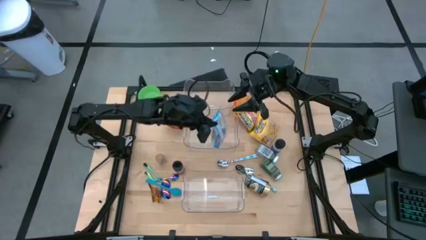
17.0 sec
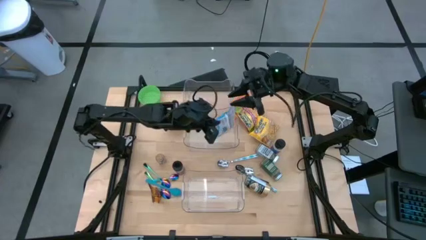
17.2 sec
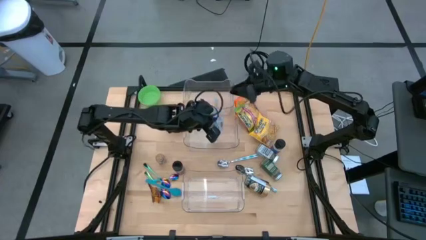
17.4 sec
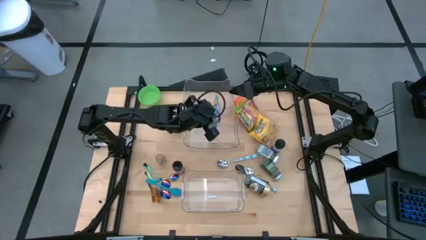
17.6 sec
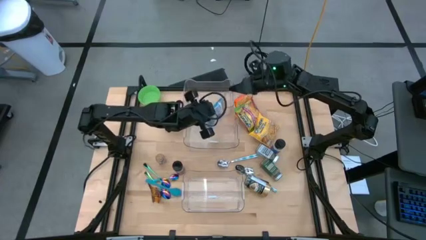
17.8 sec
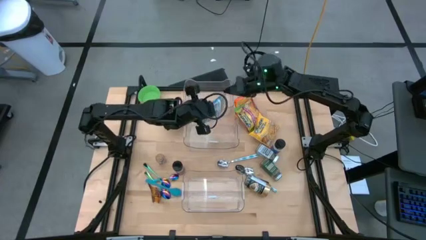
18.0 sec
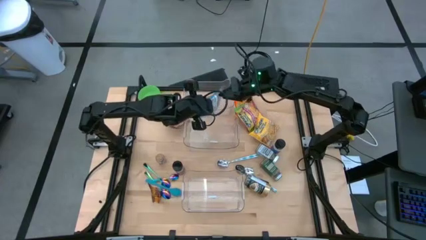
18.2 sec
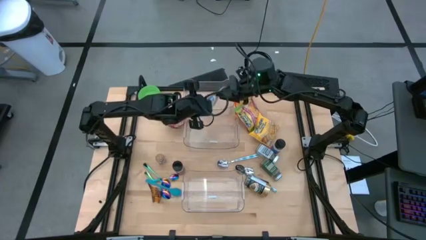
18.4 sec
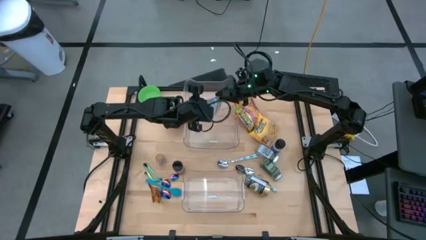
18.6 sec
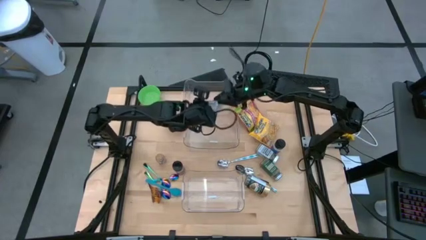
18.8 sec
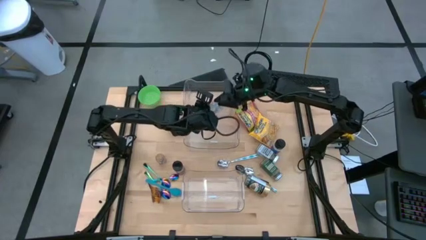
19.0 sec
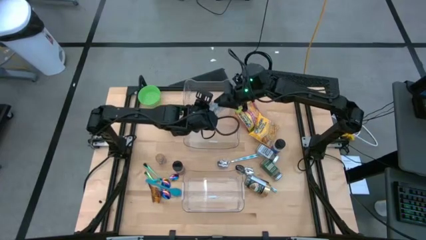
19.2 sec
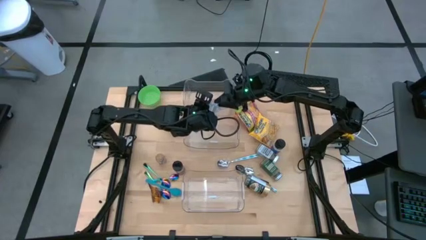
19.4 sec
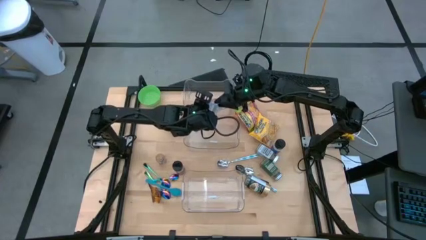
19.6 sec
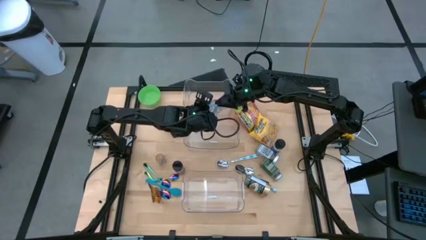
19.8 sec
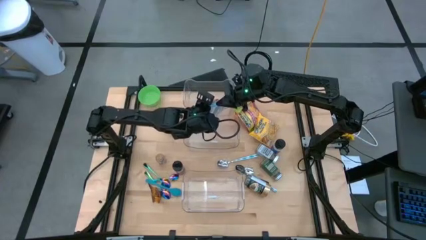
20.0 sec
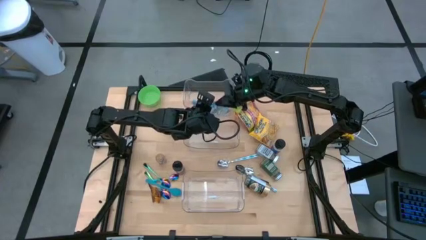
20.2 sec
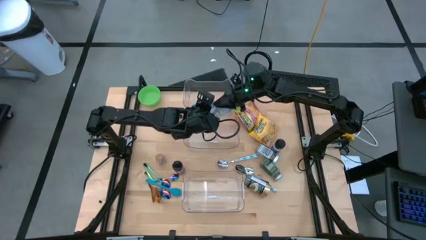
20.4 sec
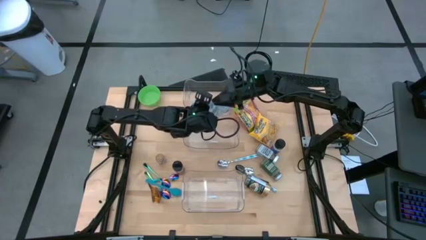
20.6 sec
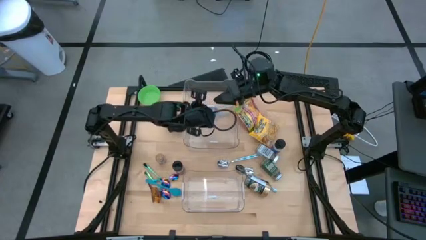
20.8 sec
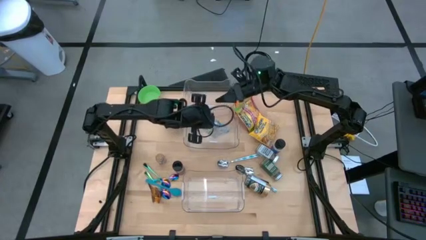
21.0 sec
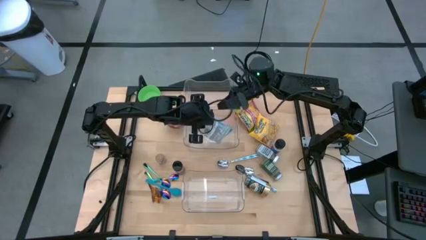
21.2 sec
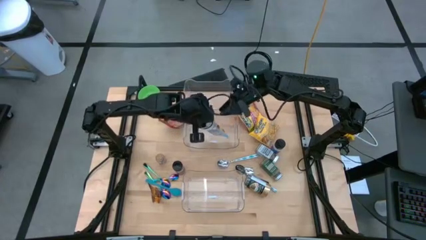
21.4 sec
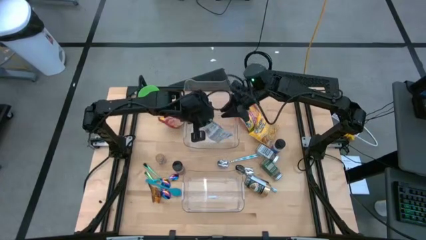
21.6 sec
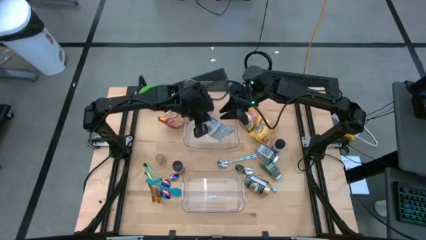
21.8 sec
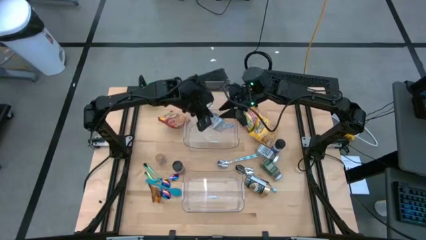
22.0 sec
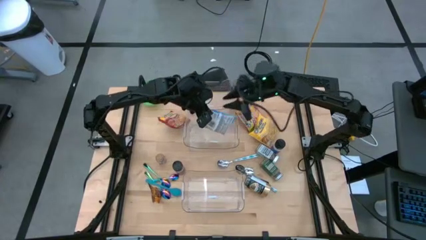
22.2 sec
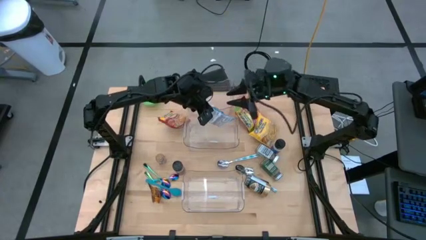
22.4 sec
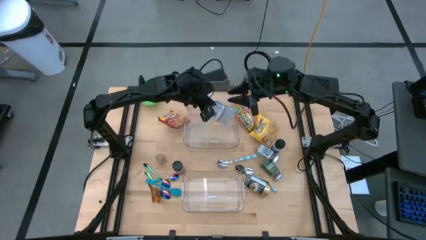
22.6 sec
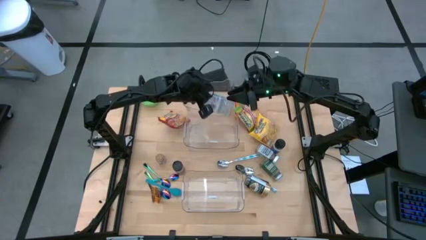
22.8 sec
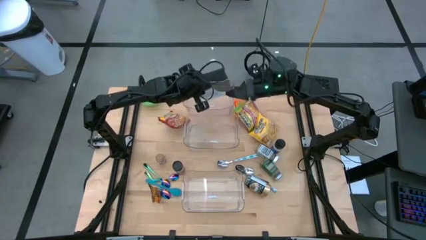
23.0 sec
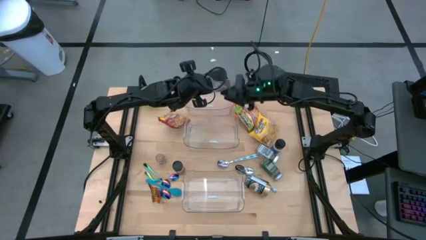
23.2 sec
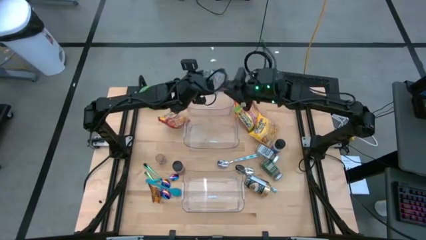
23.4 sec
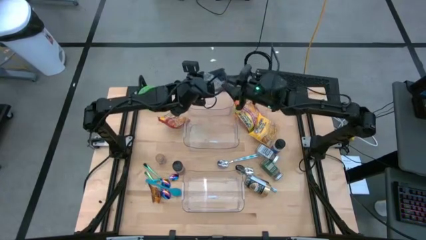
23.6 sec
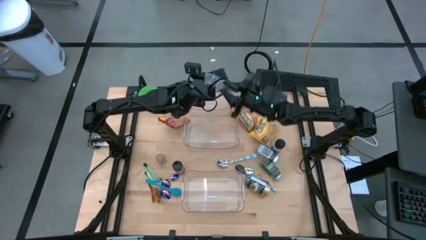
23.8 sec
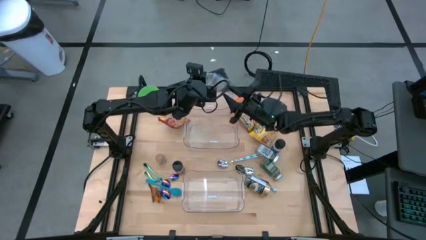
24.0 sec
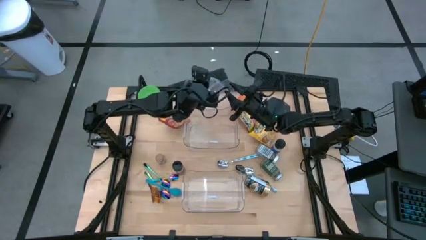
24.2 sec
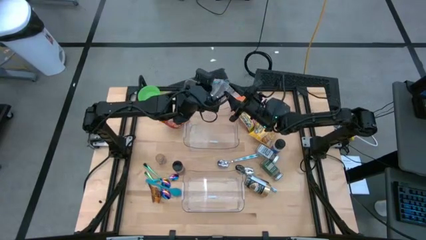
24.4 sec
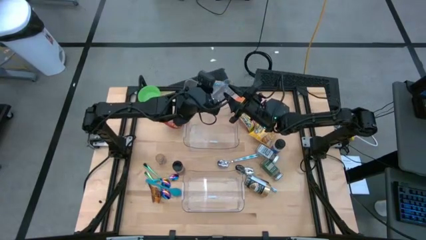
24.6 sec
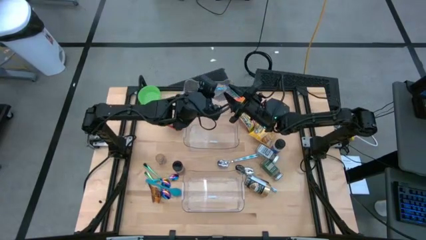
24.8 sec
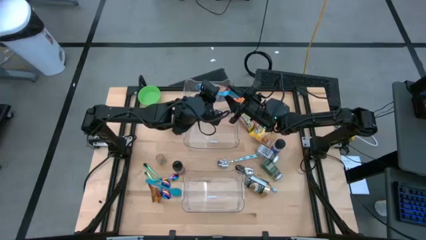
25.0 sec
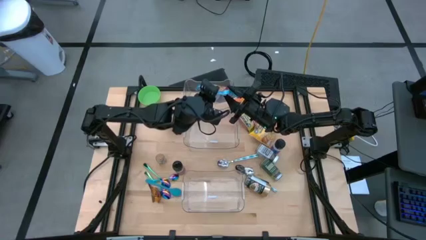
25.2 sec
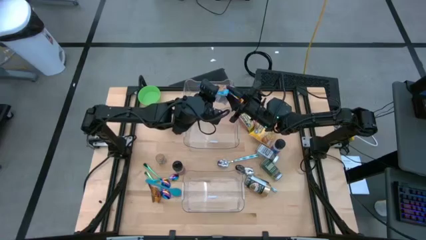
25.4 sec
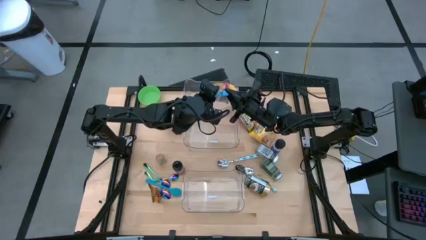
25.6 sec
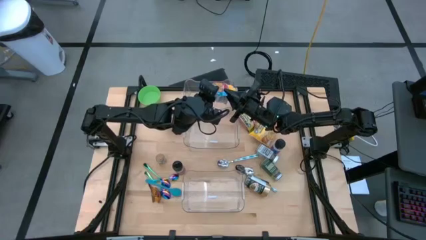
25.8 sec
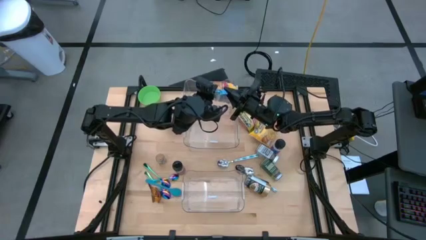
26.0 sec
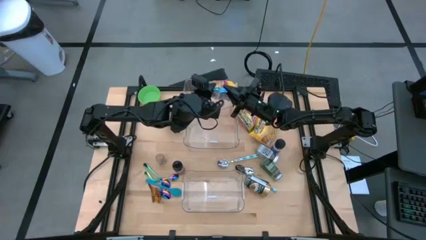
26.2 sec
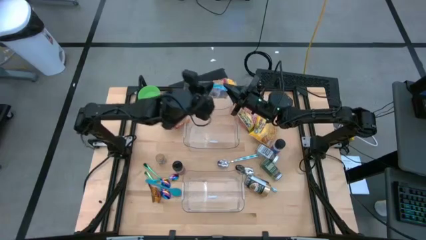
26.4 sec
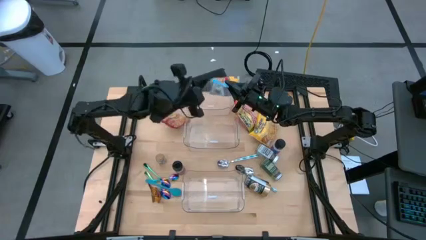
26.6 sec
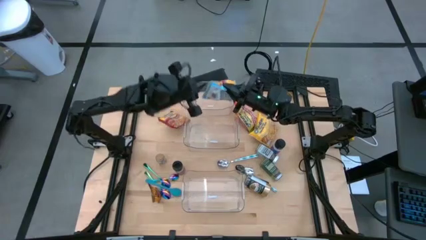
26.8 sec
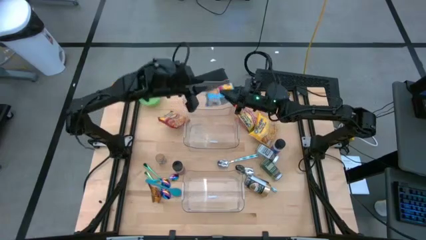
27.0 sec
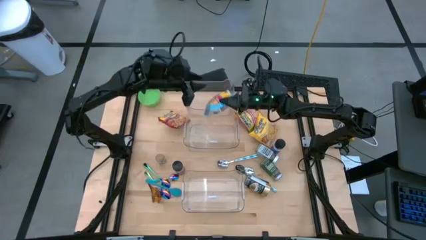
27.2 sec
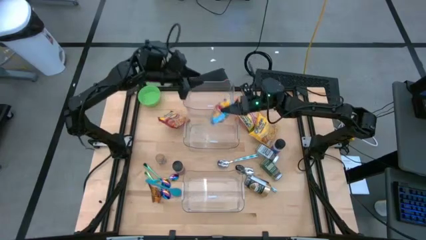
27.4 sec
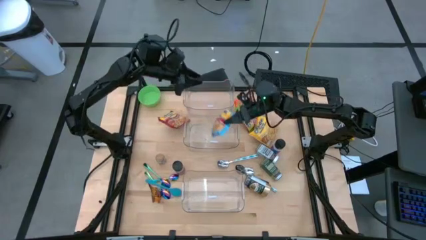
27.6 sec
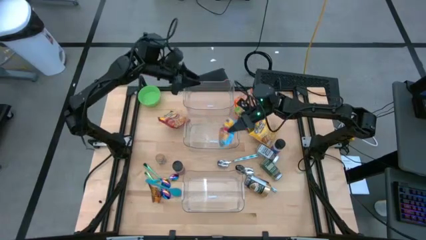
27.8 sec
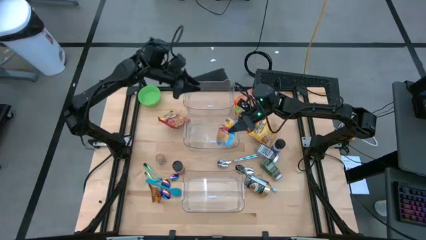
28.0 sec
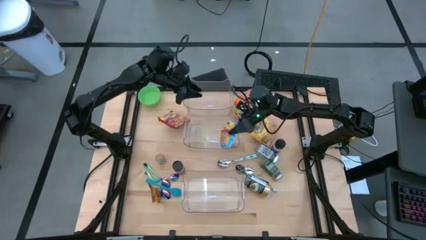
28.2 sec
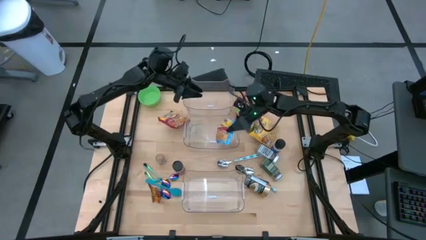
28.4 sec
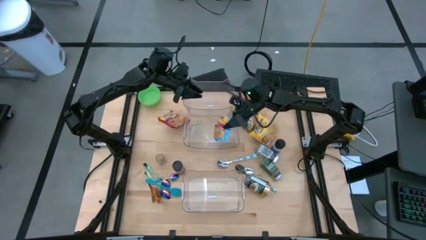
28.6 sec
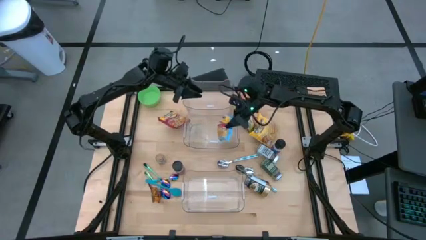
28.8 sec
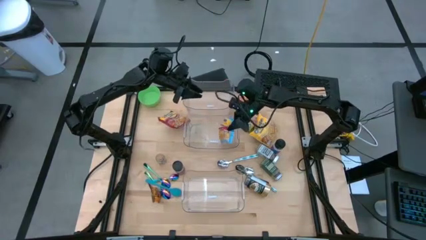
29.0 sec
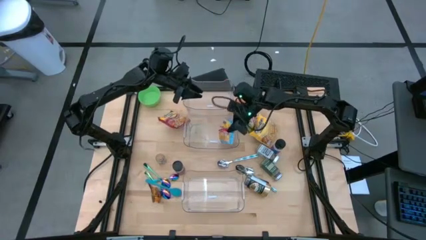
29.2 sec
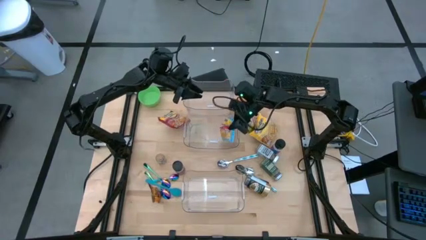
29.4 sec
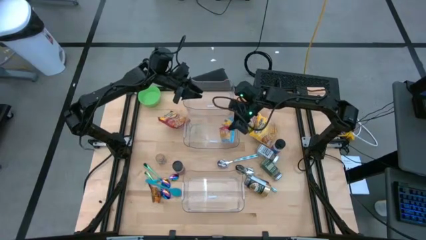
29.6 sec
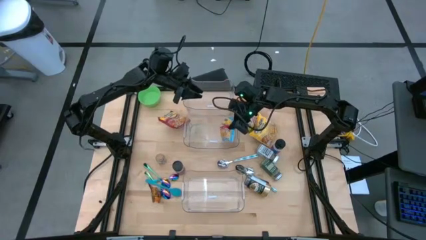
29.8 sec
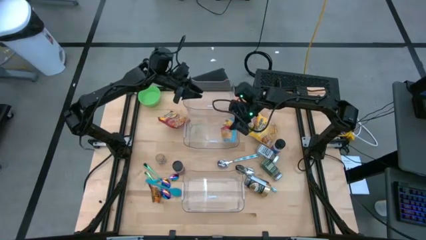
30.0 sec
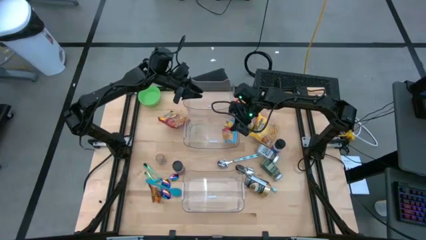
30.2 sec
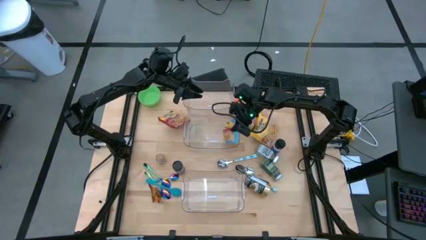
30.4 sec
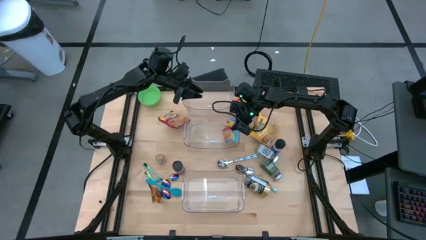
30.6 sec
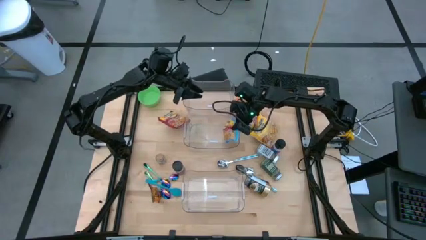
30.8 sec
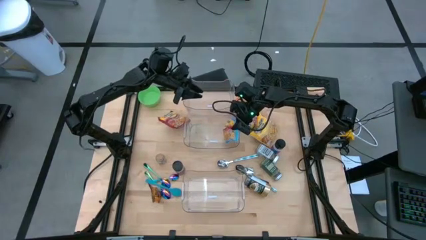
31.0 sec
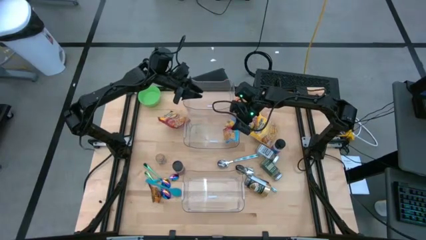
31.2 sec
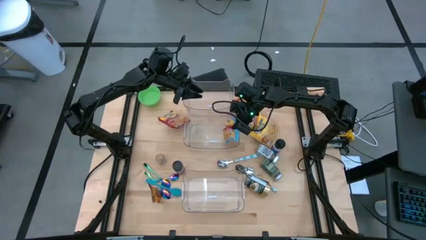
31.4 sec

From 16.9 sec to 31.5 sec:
Task: Pick & Place Food Item
Put the blue noodle pack into the middle transparent bin
